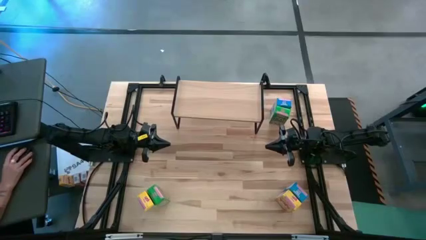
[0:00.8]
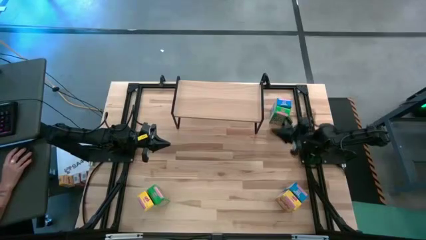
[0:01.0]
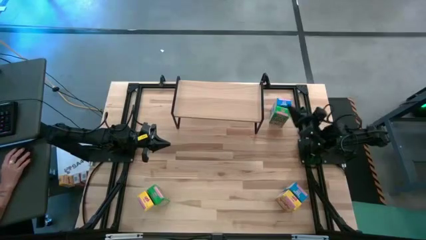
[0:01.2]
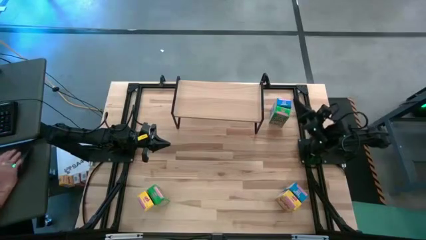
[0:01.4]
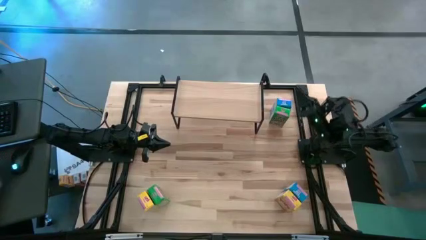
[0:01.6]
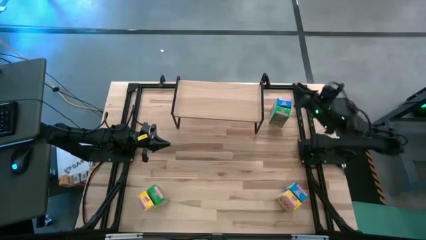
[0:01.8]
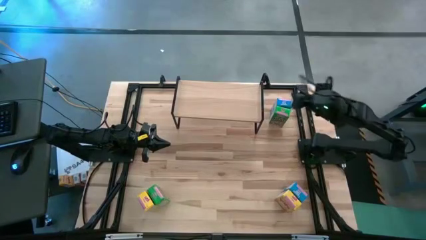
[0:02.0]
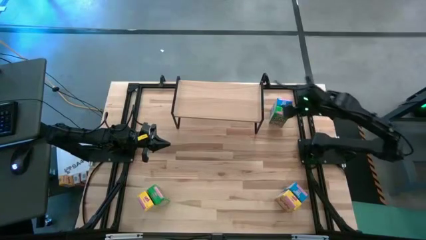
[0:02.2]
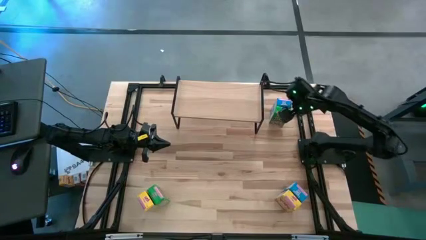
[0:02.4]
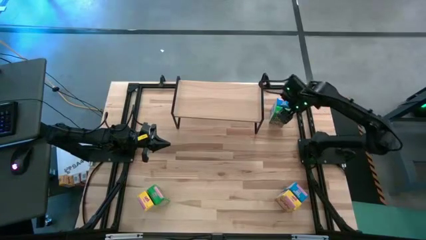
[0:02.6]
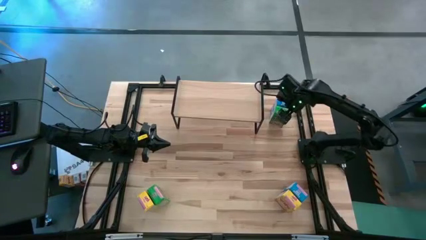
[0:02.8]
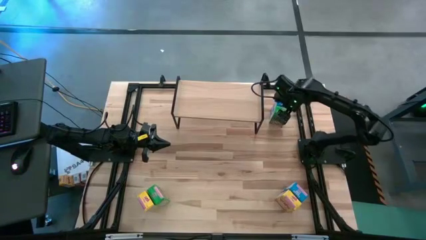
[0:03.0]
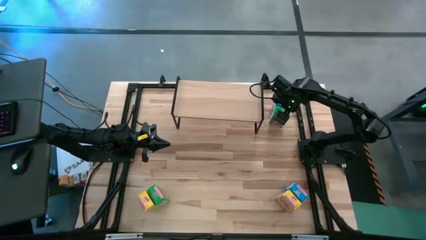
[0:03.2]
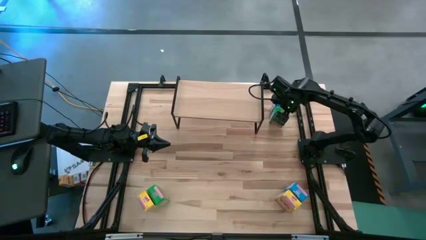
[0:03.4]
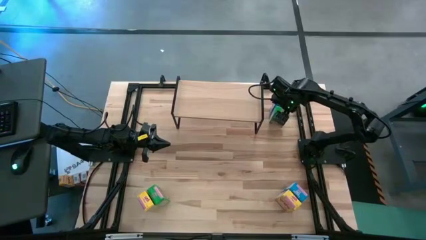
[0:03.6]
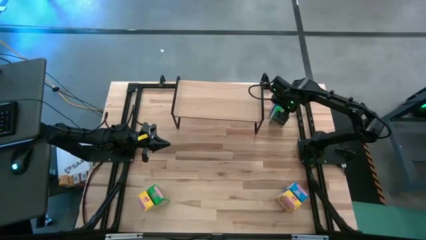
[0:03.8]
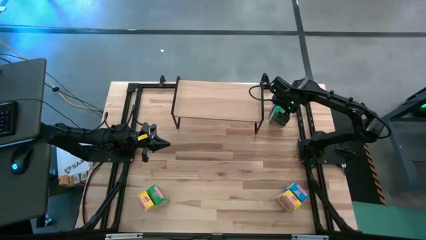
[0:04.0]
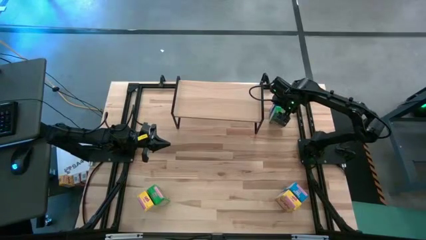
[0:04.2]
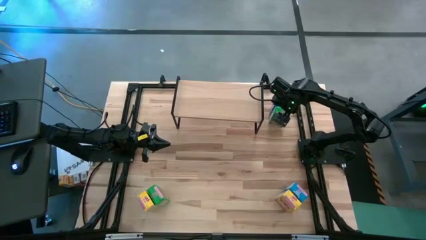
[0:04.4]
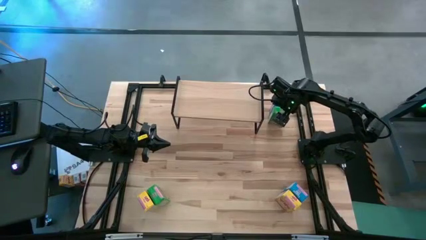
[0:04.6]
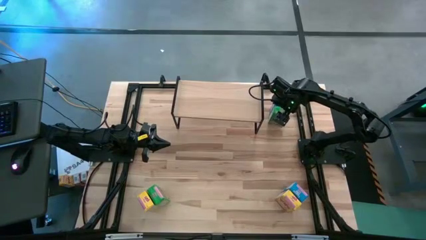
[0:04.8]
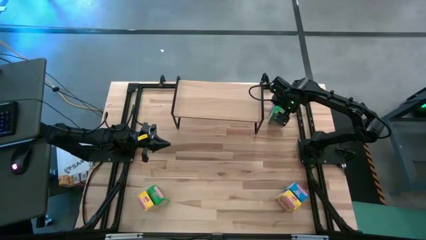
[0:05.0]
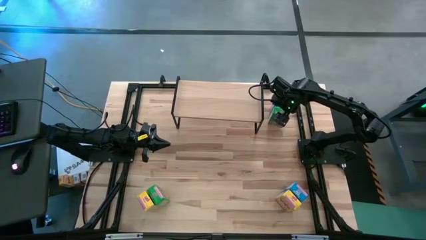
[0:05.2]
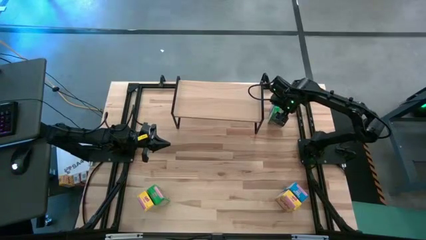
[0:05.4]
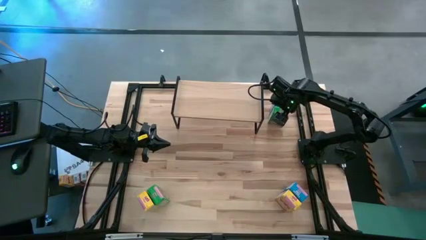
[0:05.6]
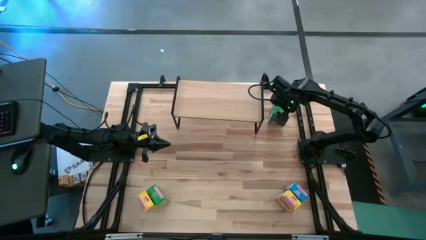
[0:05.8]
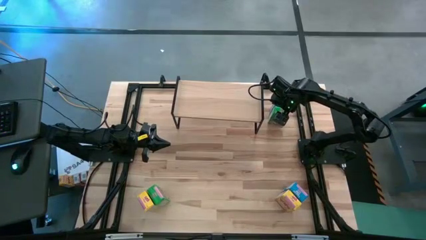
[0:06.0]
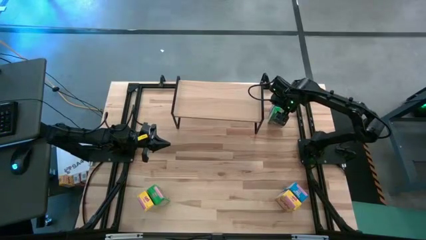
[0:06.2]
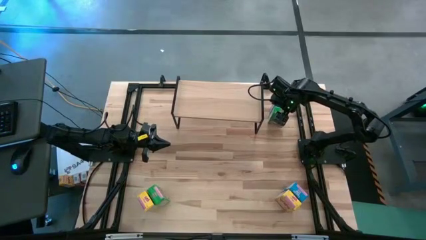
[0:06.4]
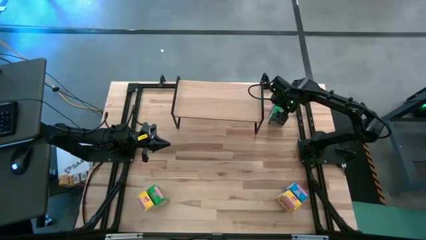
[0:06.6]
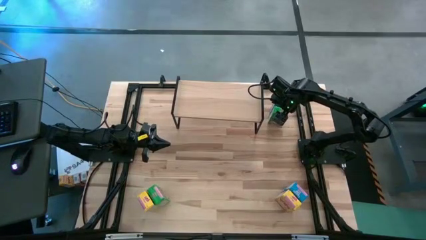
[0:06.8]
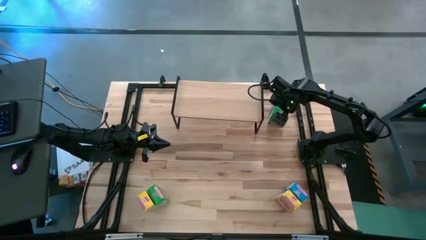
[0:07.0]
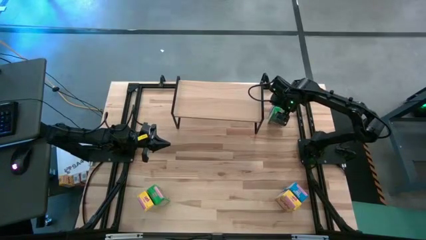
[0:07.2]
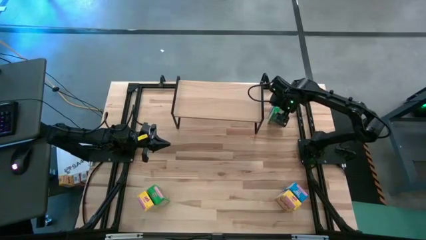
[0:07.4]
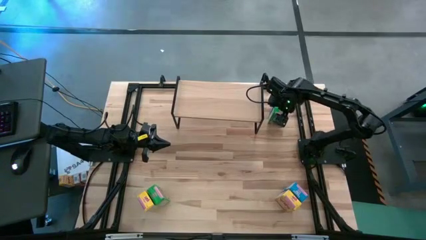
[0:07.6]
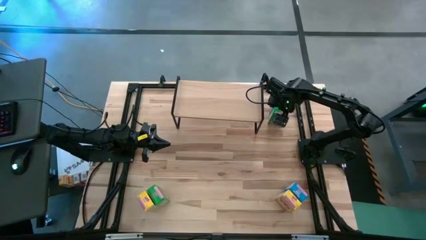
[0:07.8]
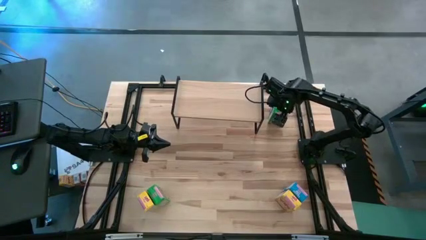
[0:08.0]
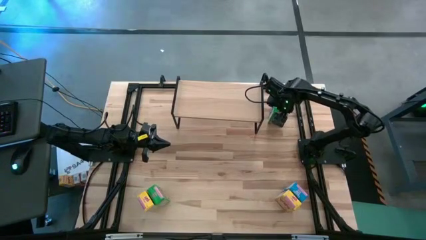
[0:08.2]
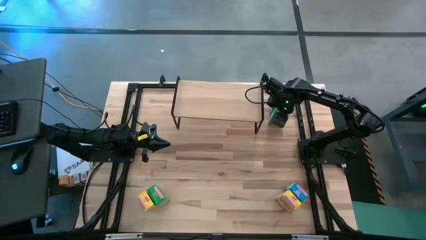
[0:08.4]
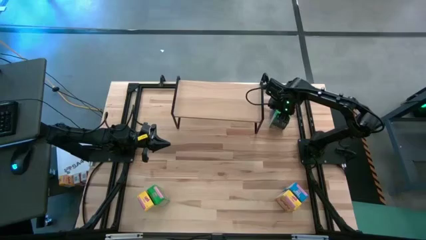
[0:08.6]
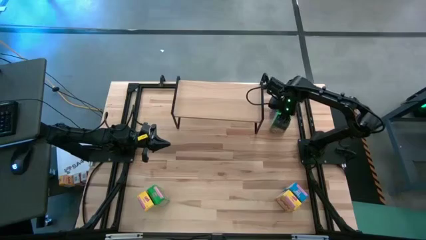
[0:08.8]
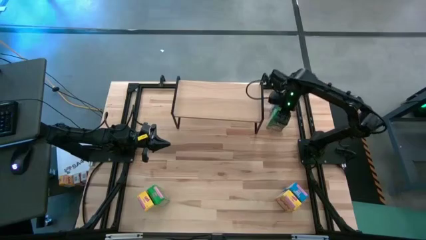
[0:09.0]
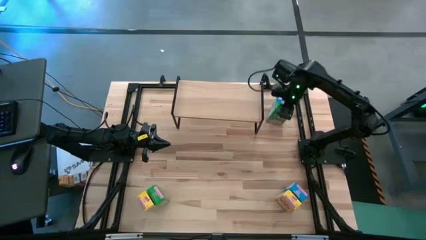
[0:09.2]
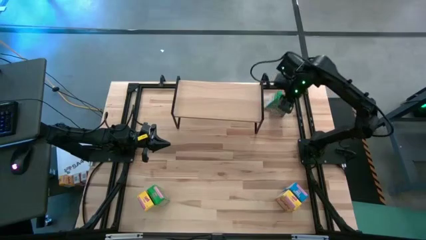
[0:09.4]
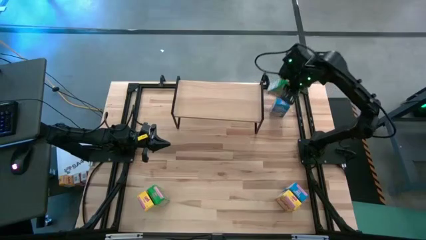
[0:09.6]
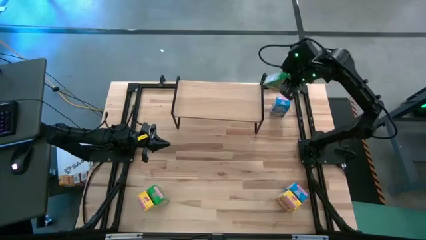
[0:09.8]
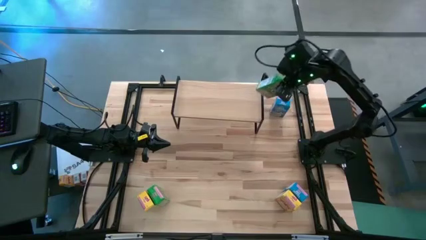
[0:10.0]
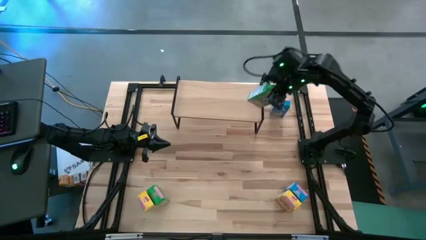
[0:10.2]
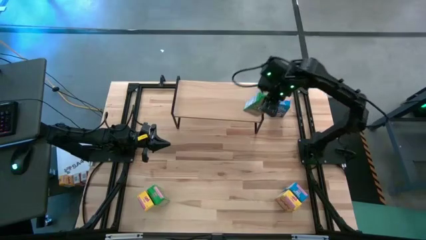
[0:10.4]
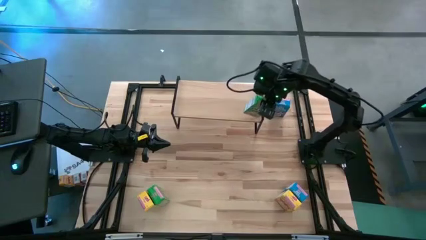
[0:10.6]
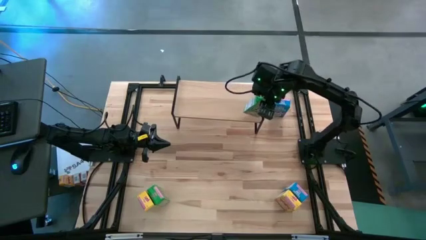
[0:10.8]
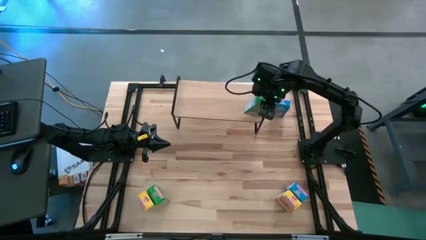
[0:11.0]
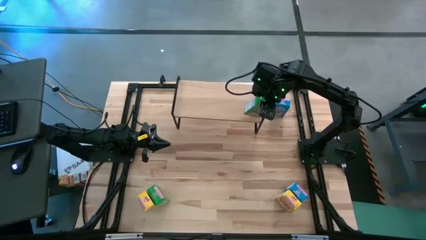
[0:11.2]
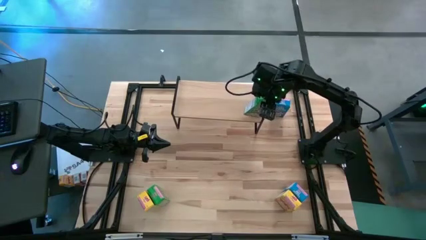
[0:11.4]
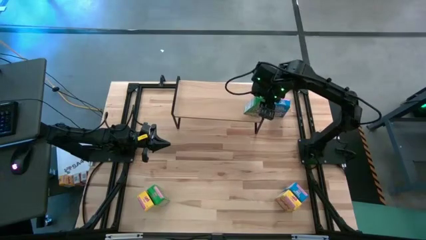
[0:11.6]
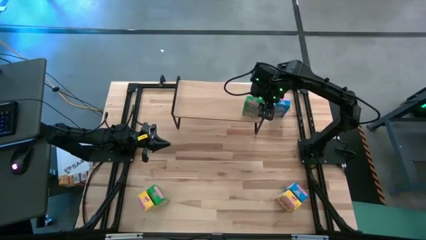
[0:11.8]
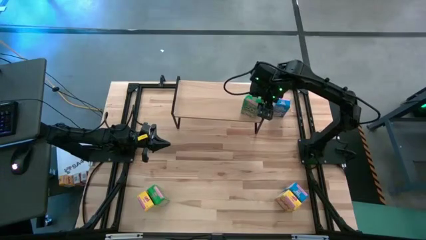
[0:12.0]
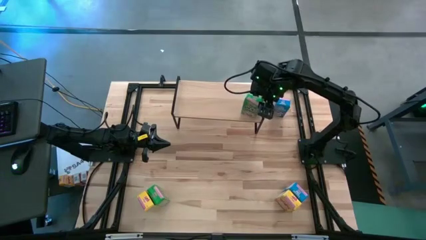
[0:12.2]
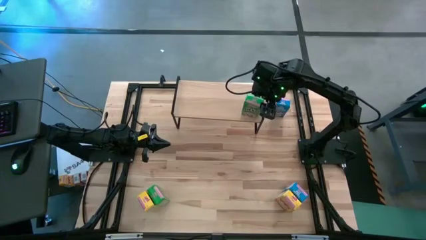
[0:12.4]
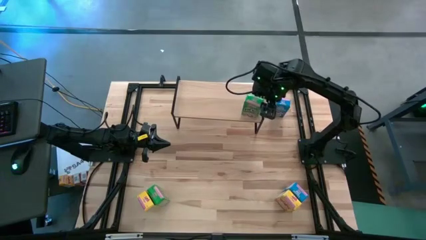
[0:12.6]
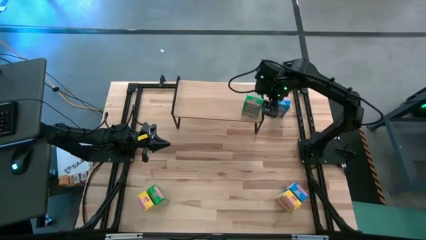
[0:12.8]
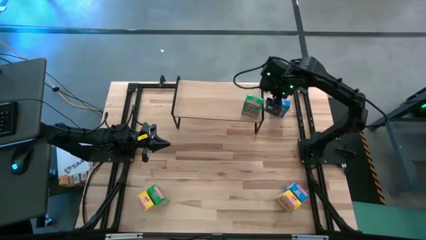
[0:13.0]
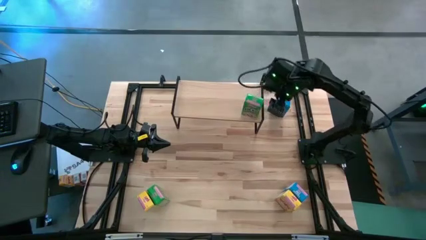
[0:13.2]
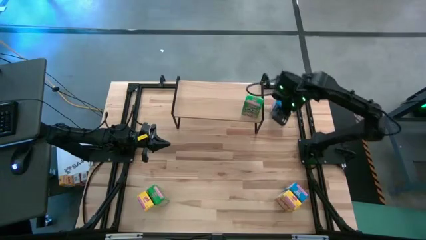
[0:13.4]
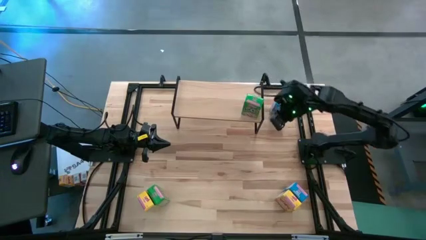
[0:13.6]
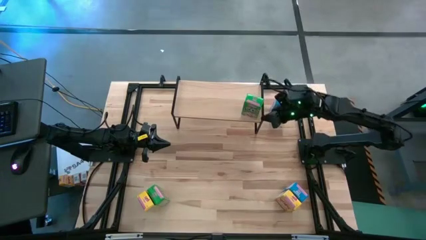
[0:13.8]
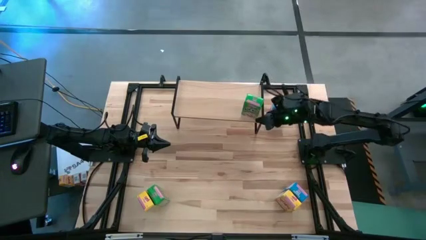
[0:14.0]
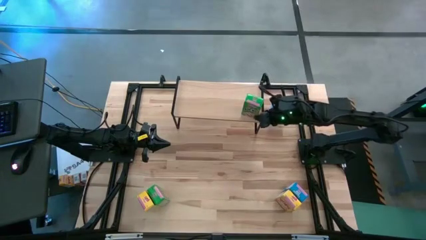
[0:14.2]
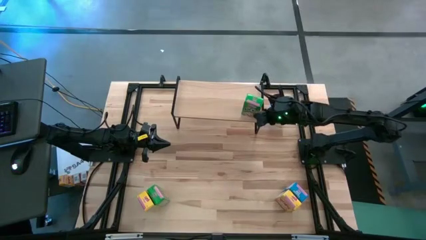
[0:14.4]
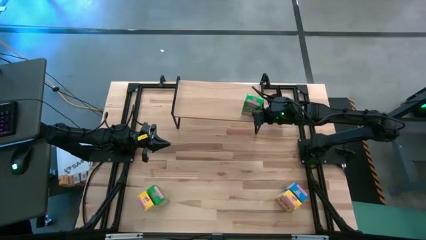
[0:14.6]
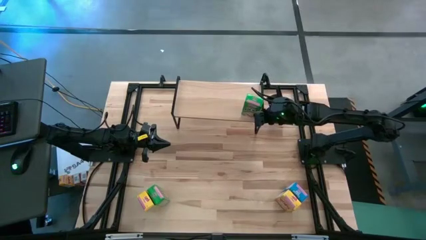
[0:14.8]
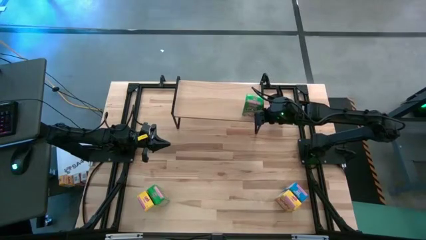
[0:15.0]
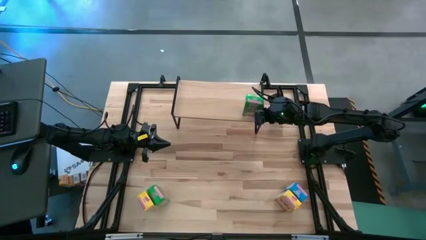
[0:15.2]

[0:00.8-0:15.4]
Task: Stack cereal on shelf
Put the top green cereal box on the shelf
